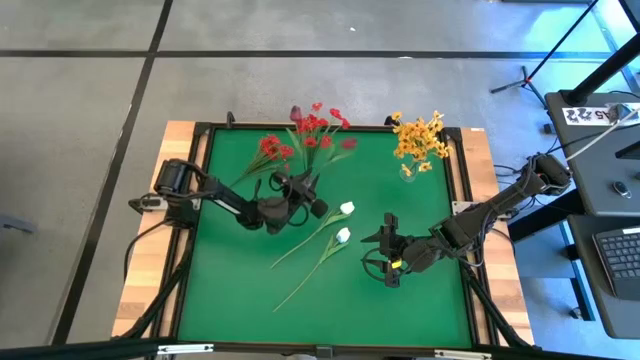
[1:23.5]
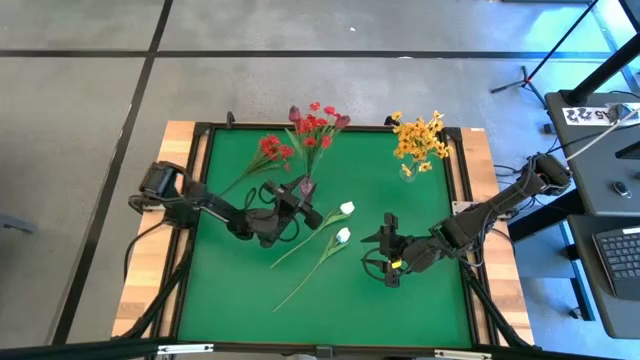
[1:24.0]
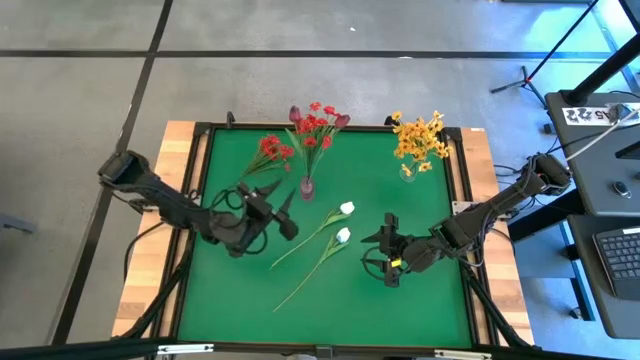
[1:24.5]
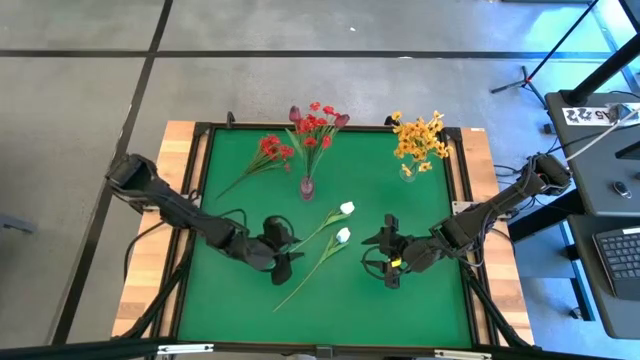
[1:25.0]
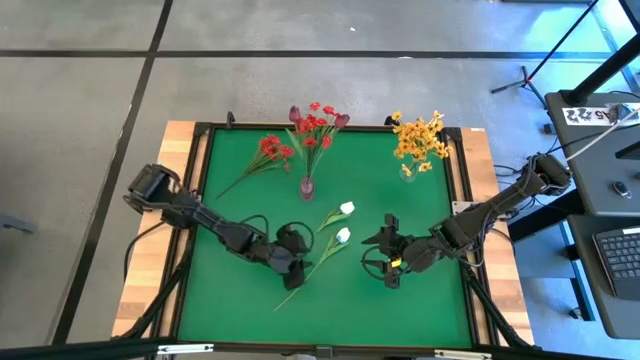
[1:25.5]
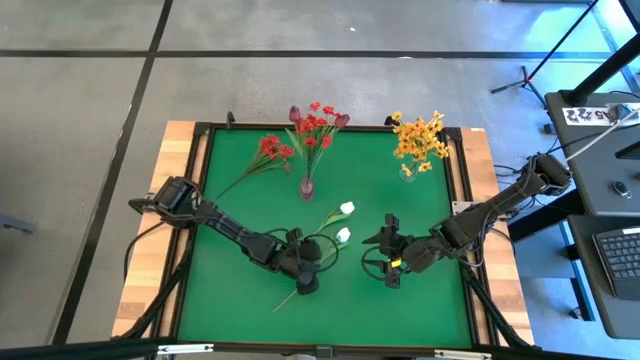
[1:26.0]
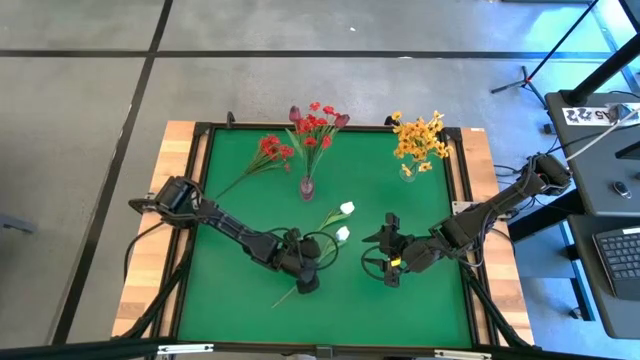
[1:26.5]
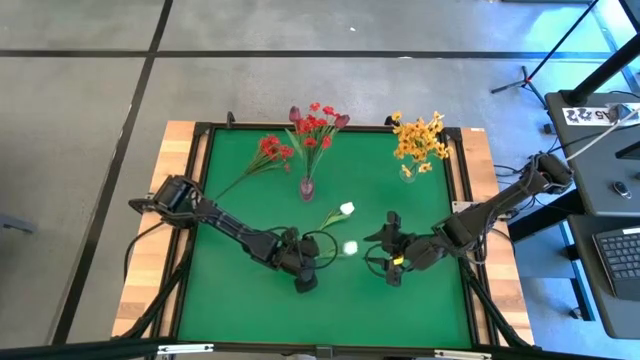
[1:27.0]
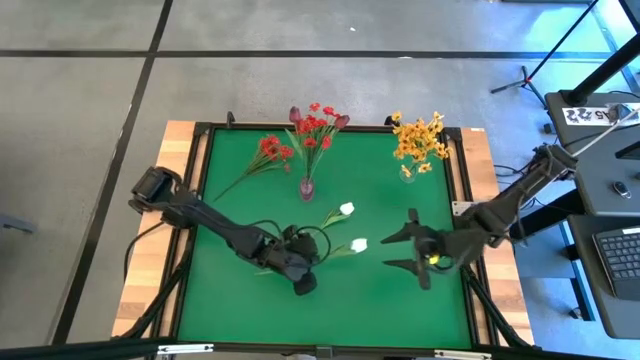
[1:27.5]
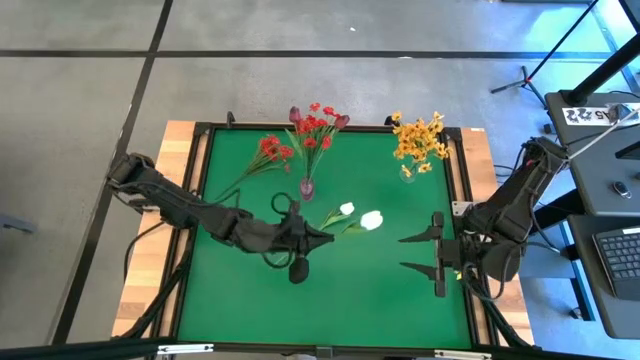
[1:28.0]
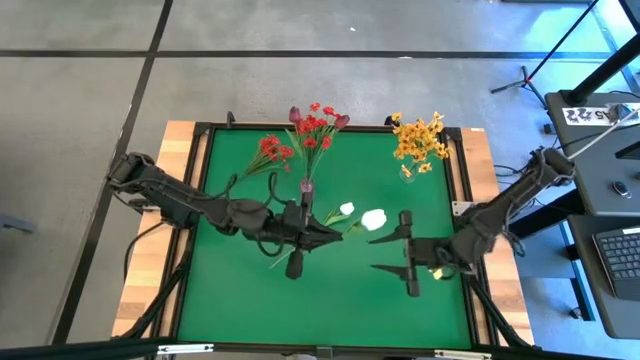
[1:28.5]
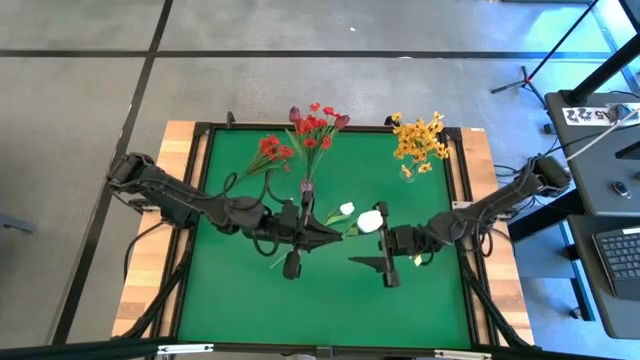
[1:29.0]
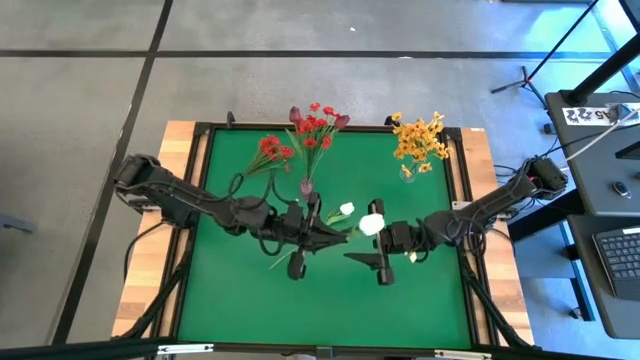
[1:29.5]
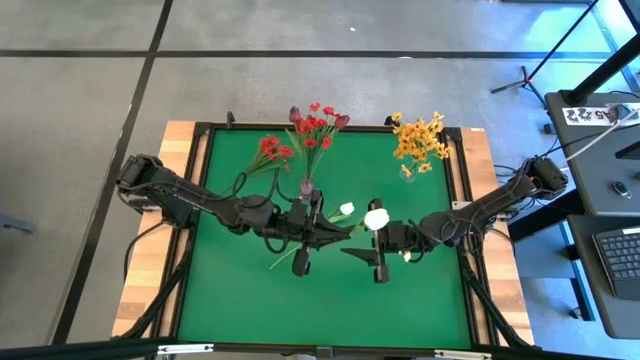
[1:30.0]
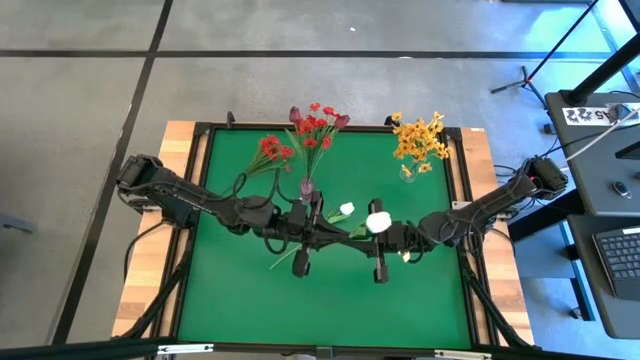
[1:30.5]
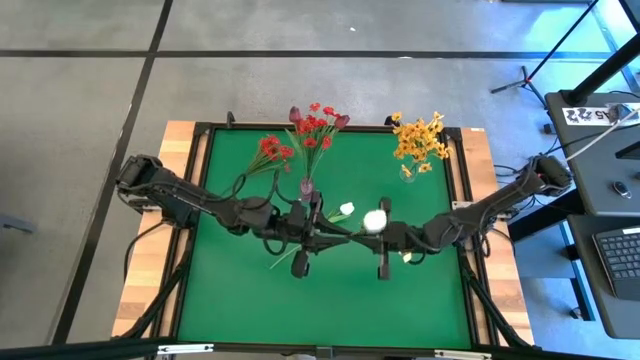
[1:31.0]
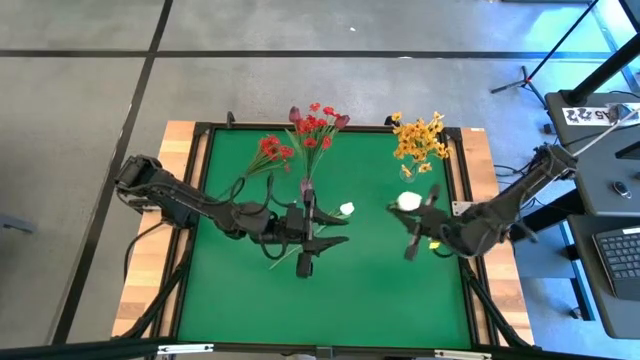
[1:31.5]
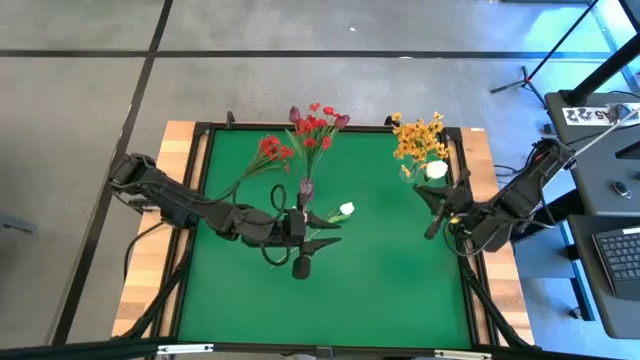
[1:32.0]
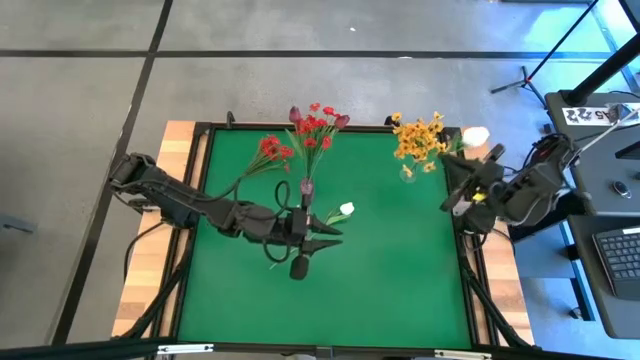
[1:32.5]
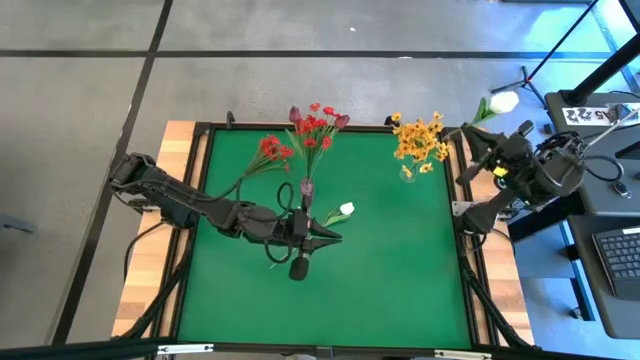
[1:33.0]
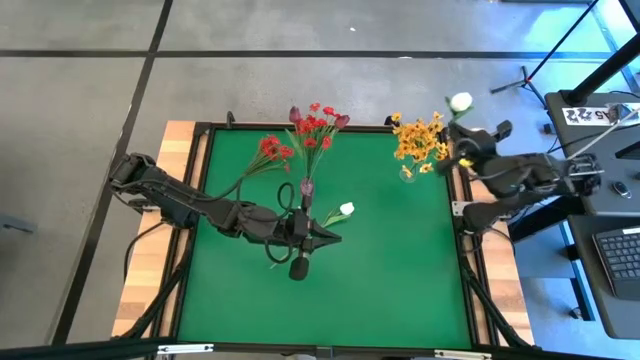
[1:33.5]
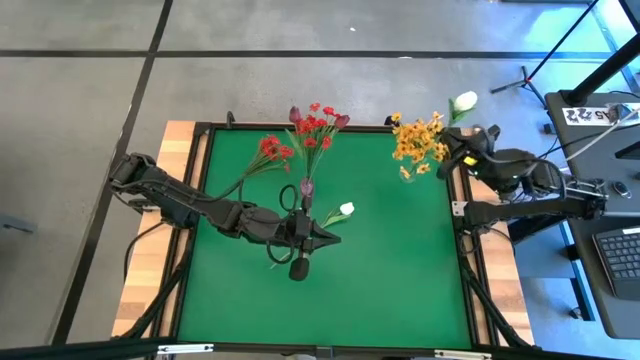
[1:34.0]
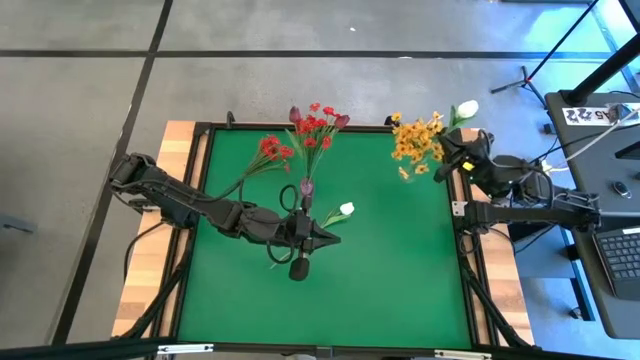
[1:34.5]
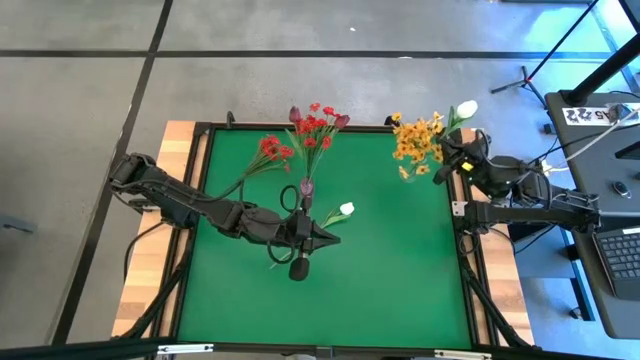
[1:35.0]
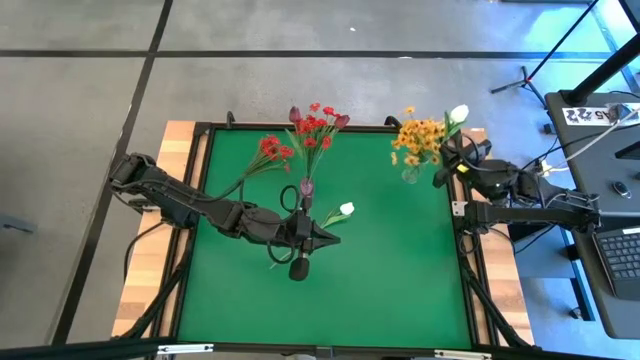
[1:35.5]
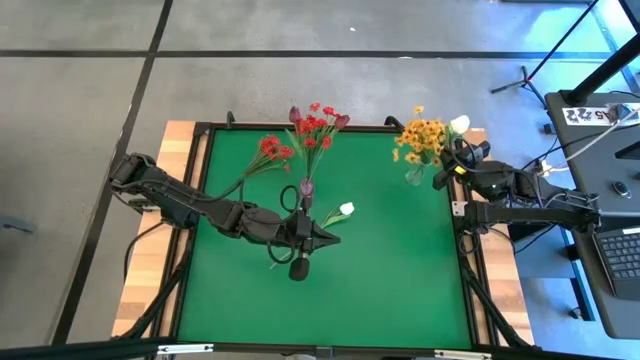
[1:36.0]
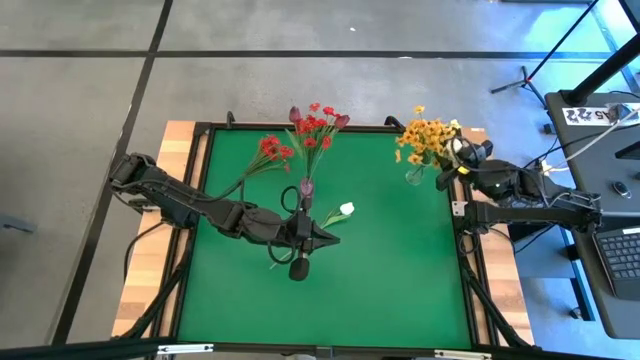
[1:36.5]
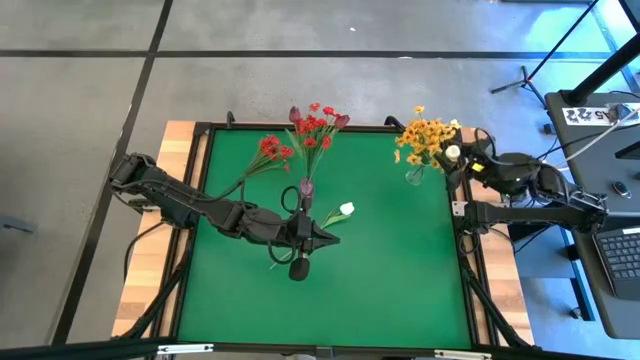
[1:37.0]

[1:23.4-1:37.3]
Task: Sort flowers into vase by color
Put the bottom white tulip into the transparent vase

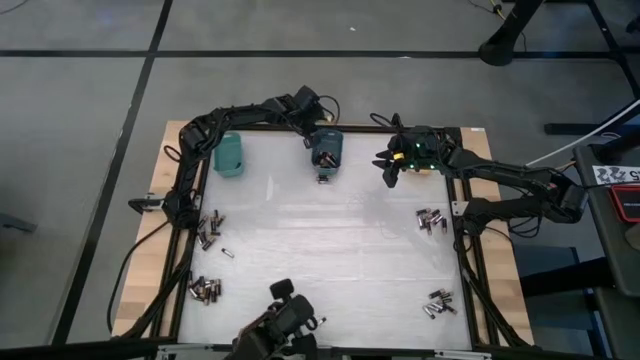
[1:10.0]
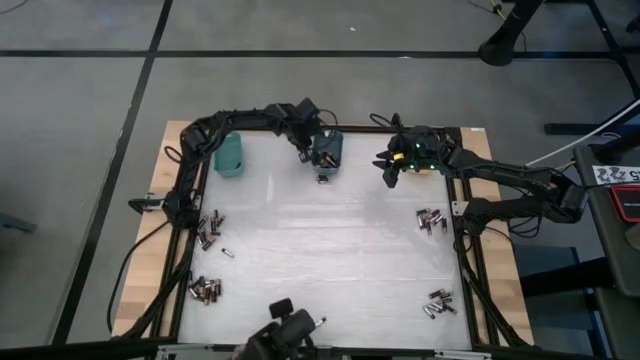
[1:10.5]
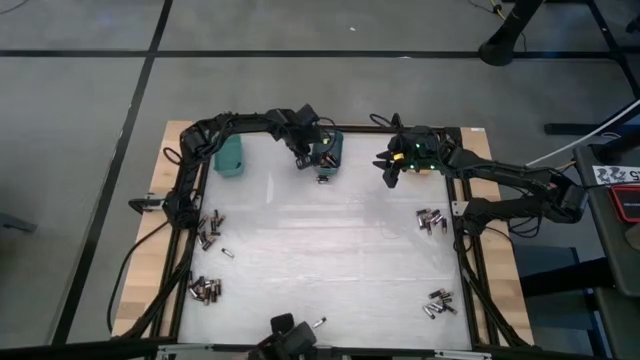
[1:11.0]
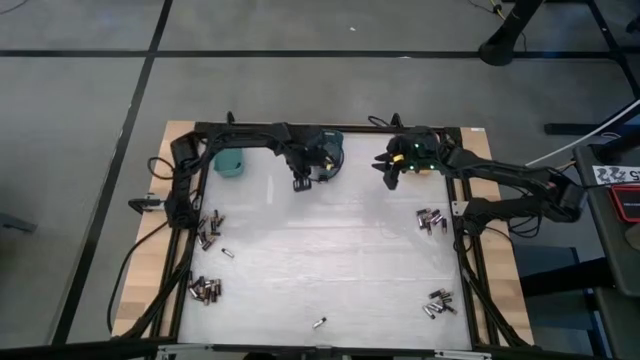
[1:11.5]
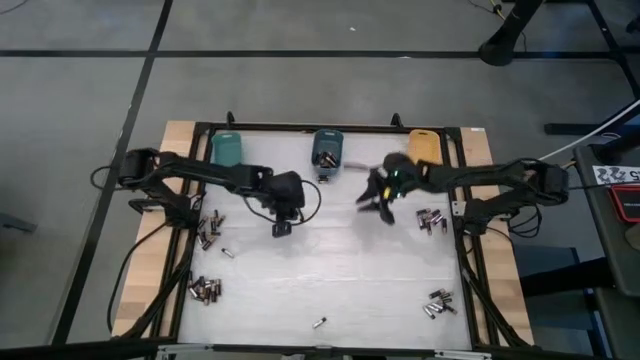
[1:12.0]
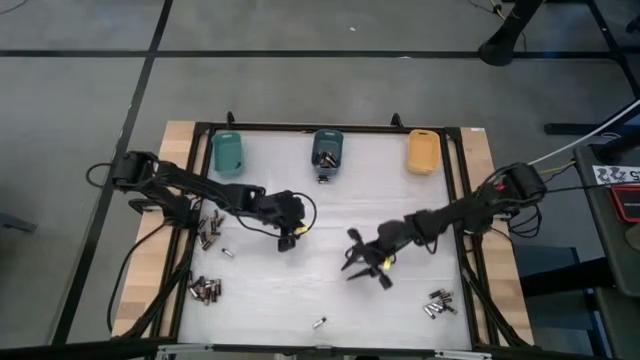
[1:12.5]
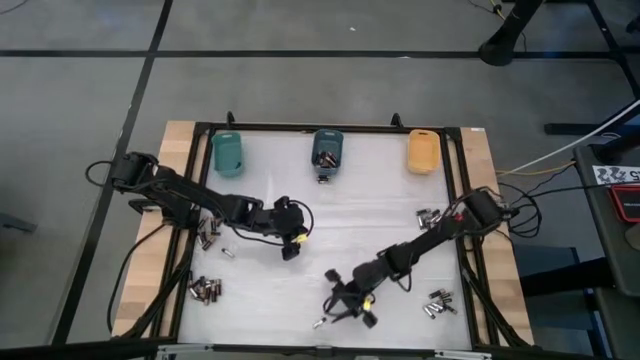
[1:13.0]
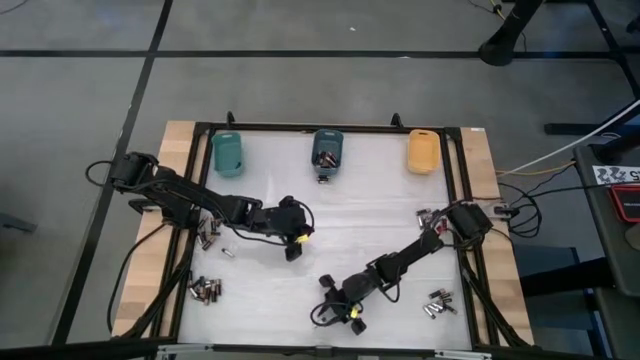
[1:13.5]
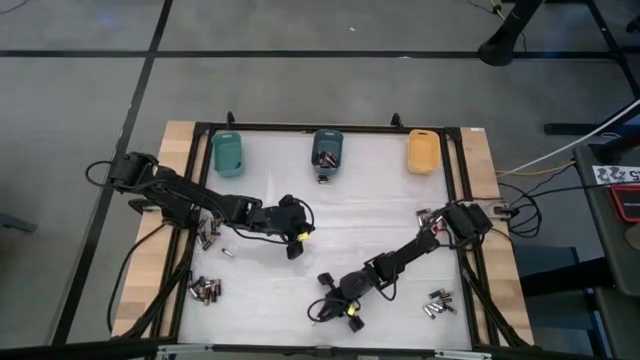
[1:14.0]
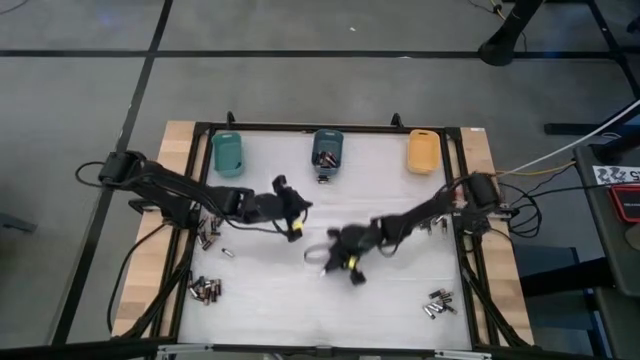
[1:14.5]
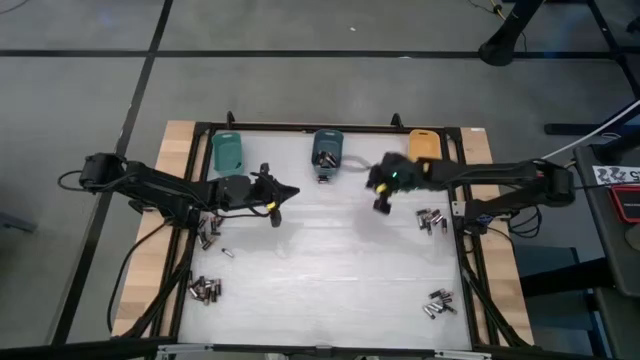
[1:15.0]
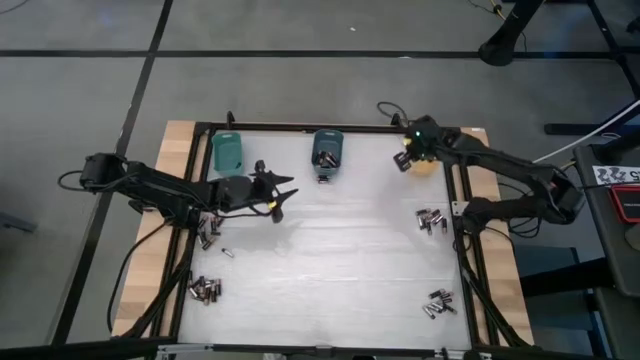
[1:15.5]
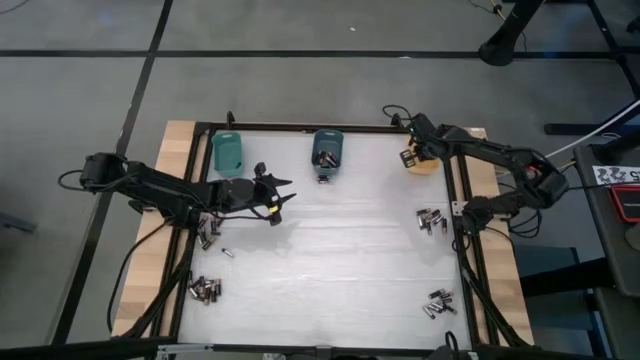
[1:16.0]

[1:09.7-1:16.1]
Task: Sort batteries
Put the silver battery into the yellow bin
